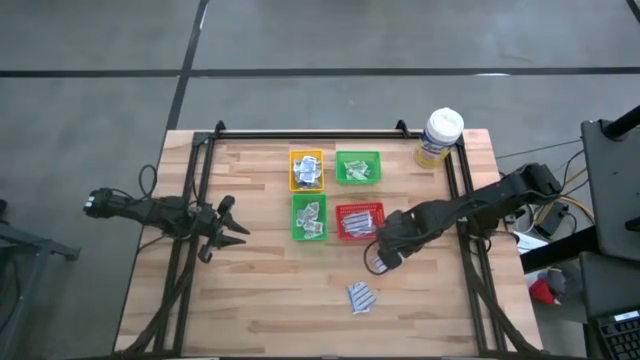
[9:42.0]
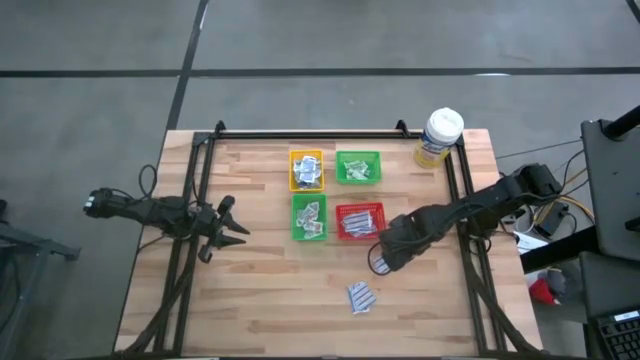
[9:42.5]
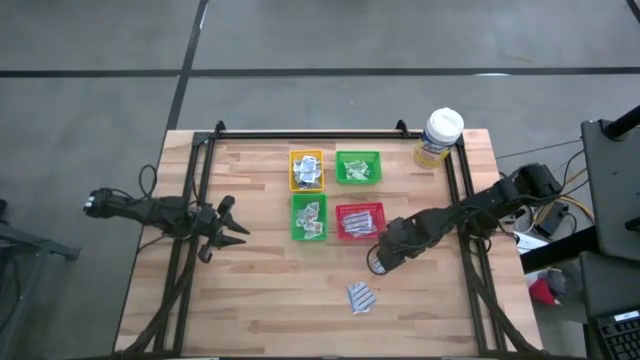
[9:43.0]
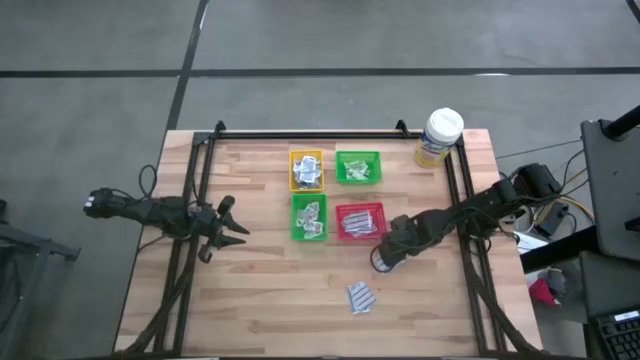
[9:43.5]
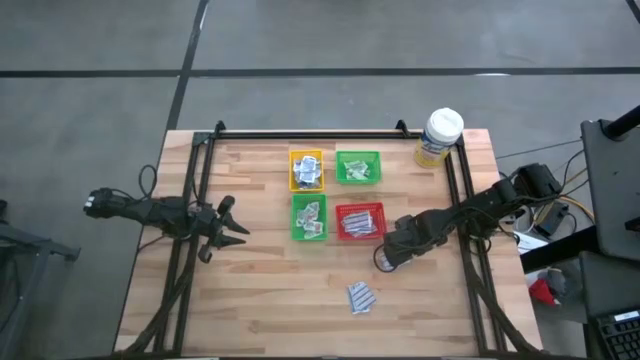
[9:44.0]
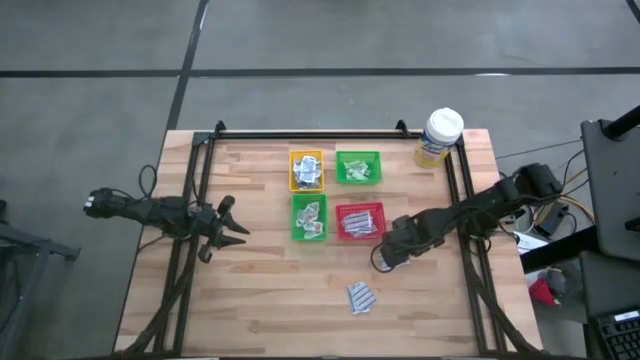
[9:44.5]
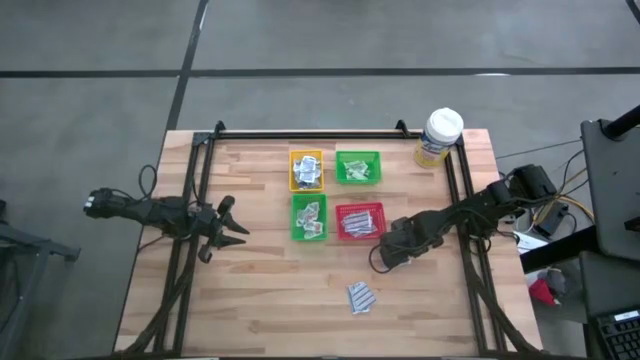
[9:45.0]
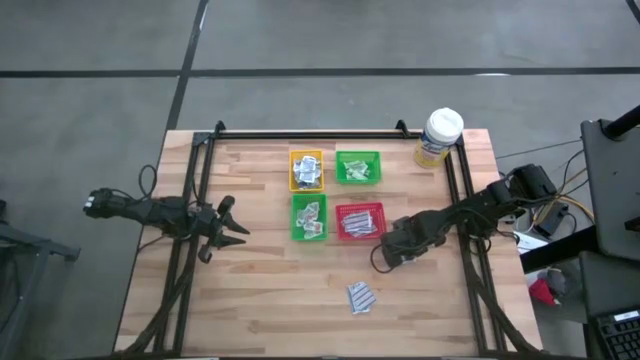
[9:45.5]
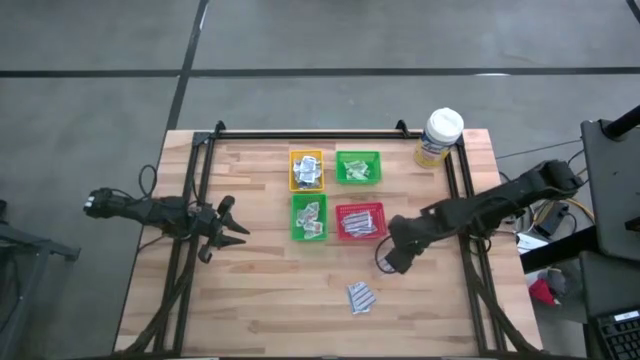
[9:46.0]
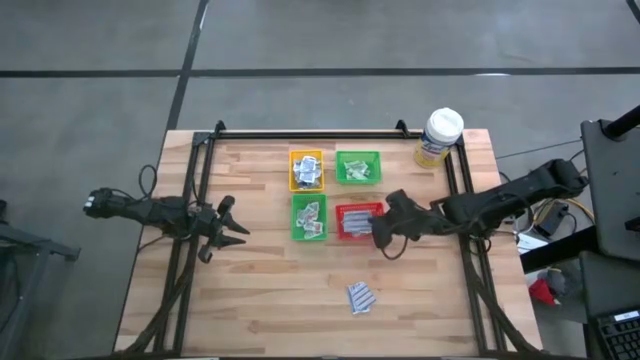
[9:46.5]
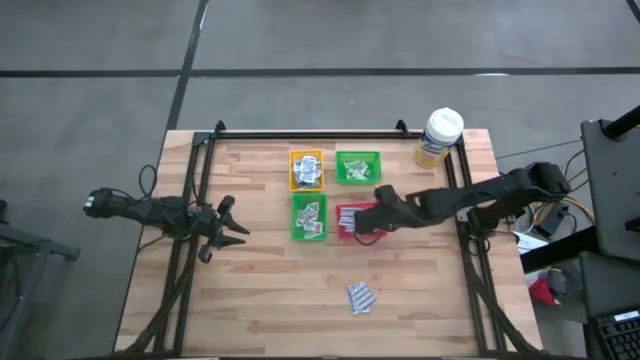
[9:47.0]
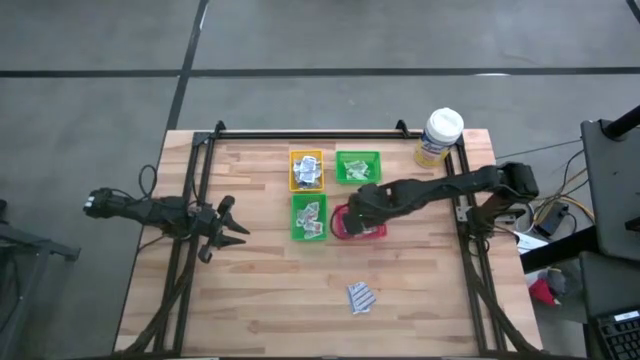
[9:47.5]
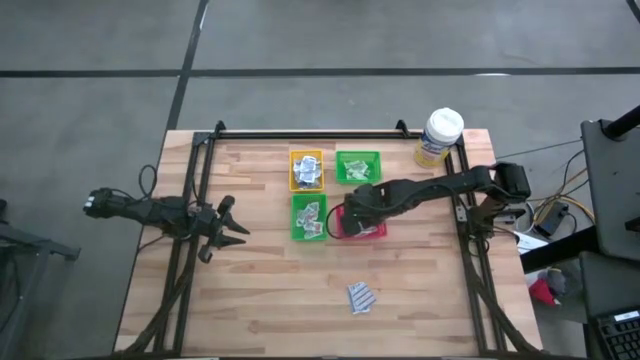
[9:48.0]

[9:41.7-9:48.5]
Task: Pick & Place First Aid Supplies
Put the blue bandage pack into the red bin

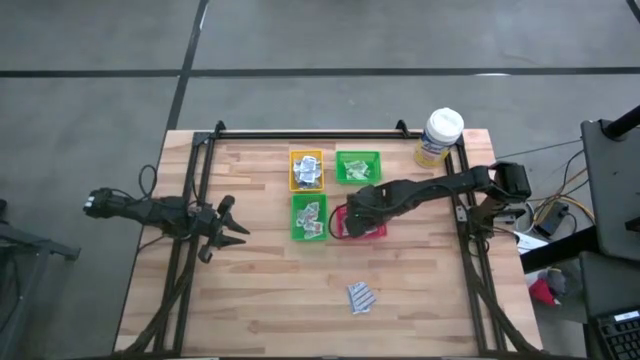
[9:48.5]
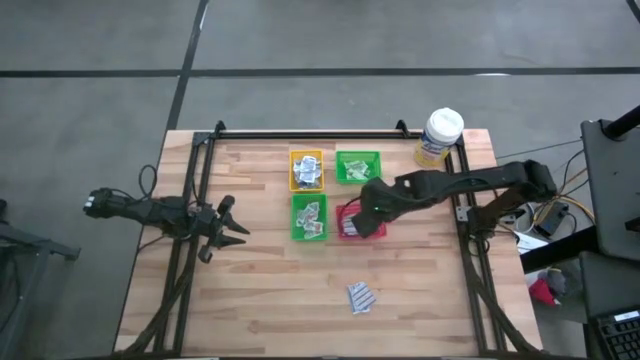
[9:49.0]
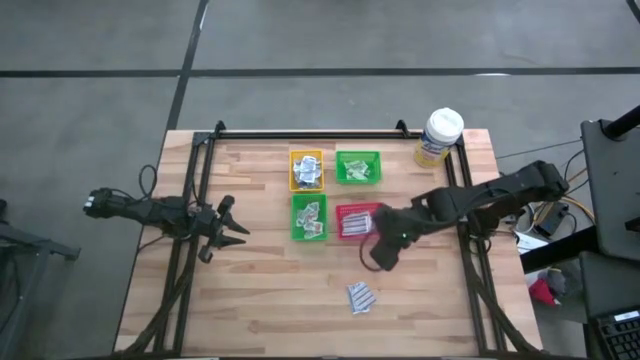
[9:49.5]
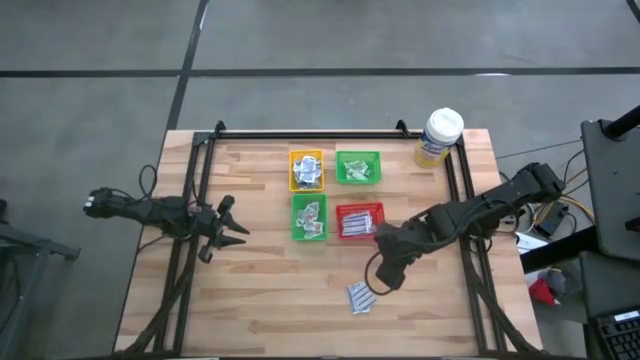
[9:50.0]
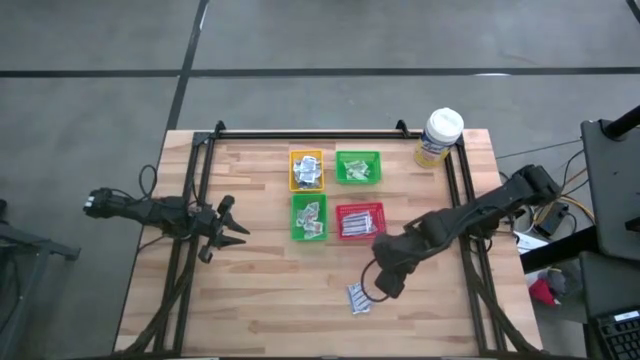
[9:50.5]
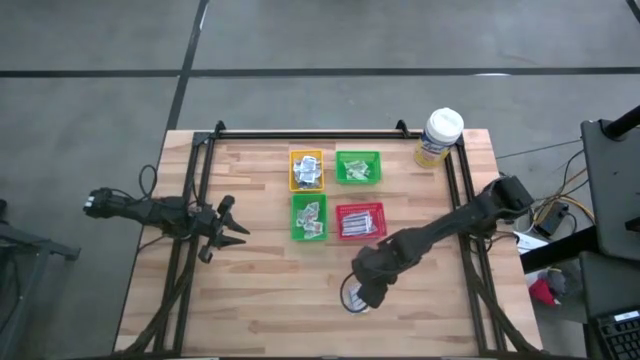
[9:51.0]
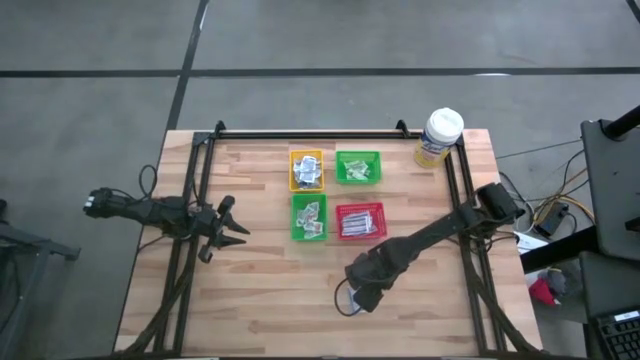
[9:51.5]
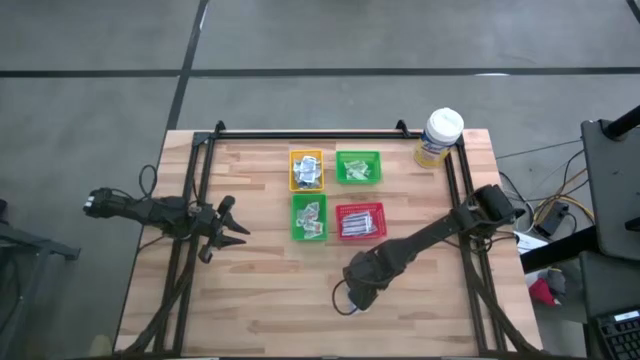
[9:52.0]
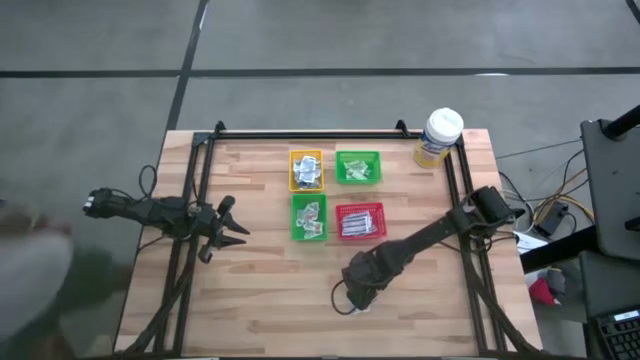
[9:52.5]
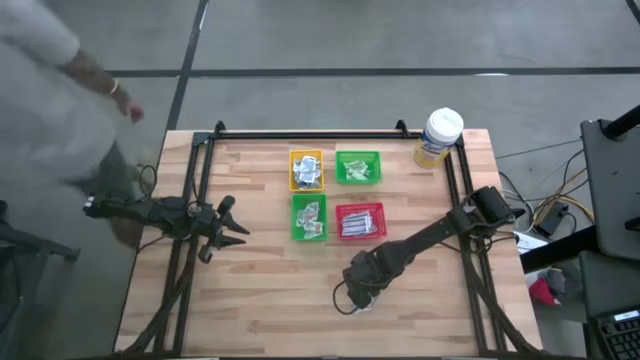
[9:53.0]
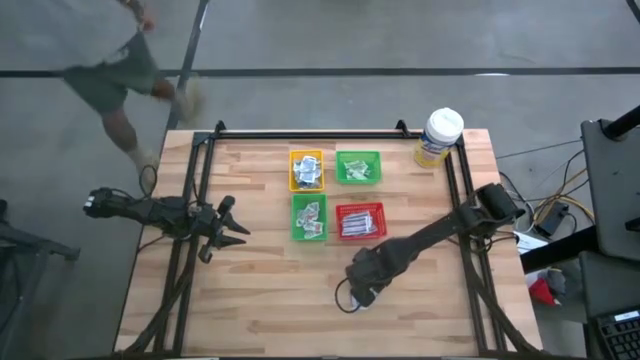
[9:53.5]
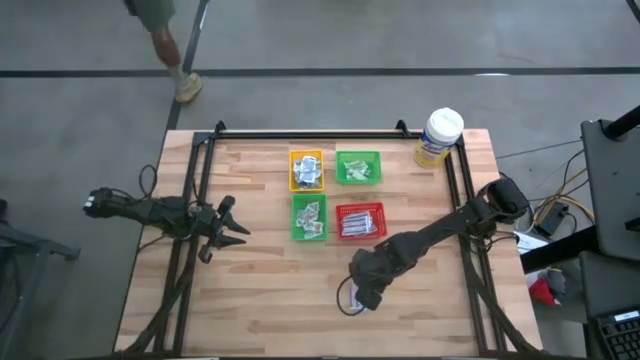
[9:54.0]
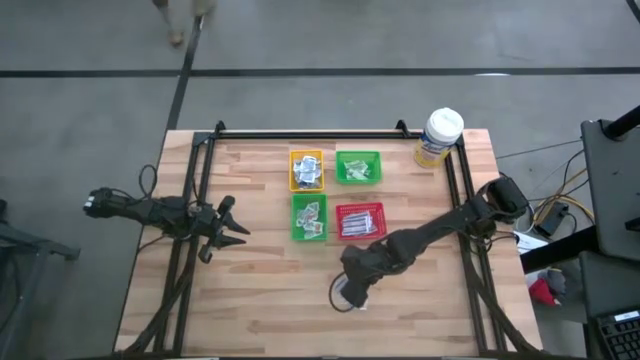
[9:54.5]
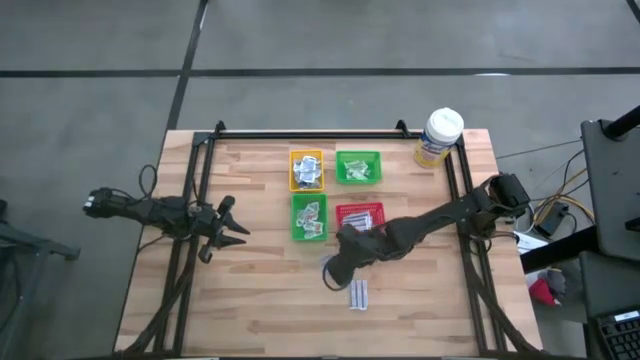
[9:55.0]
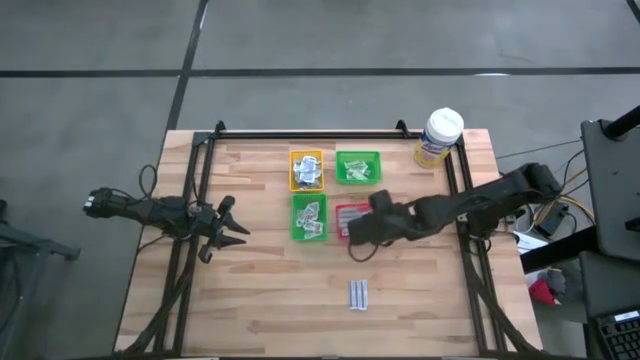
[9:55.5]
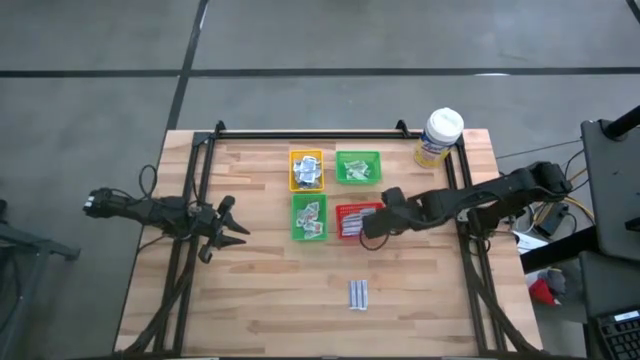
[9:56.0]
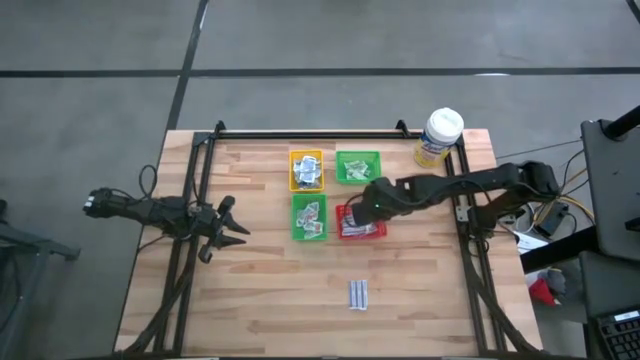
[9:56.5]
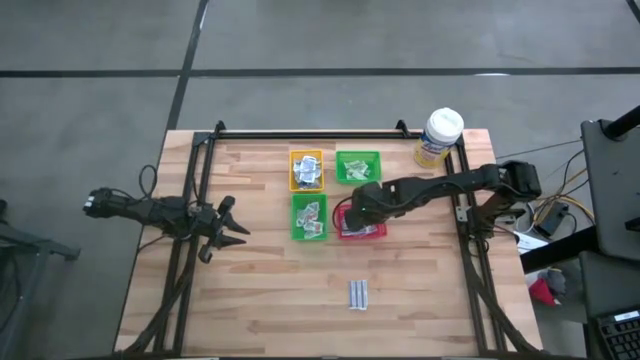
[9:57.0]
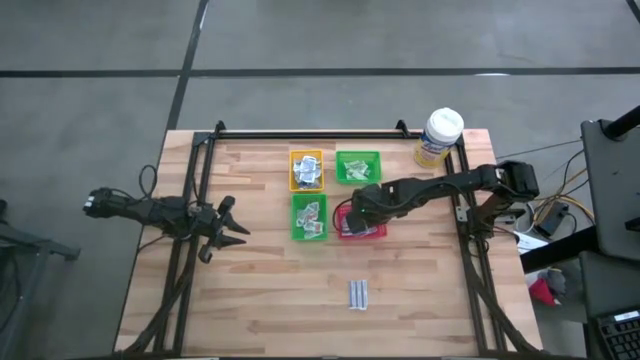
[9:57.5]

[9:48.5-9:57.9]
Put the blue bandage pack into the red bin

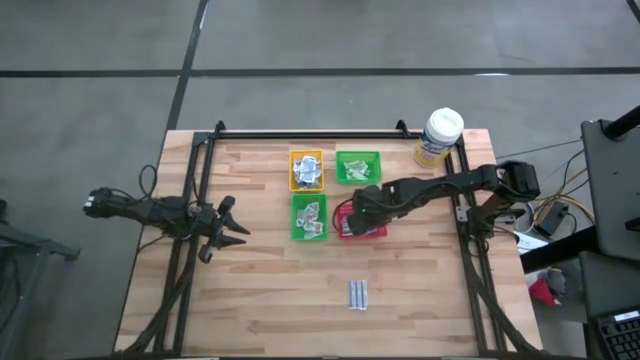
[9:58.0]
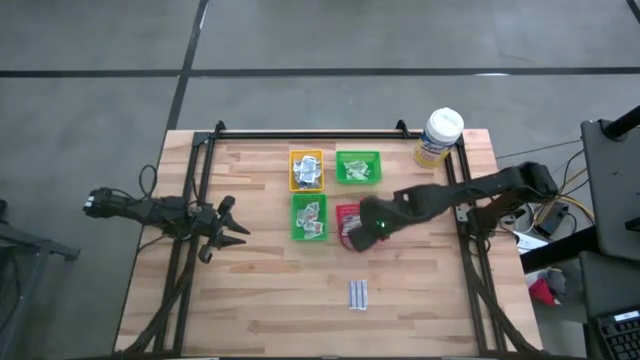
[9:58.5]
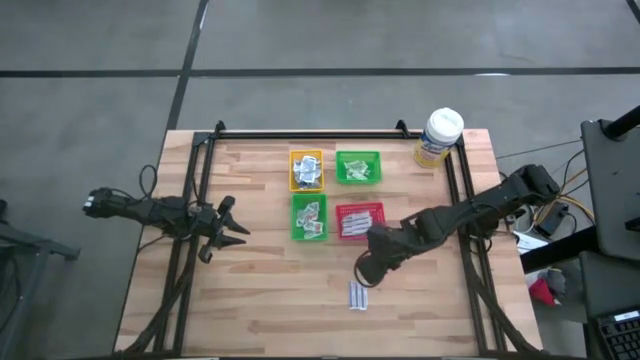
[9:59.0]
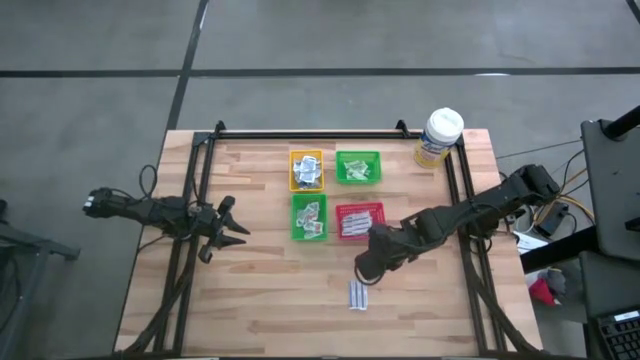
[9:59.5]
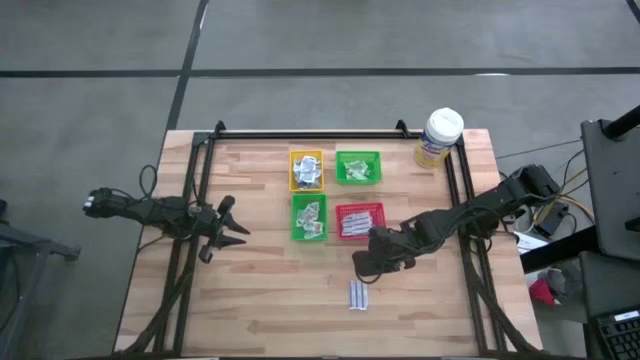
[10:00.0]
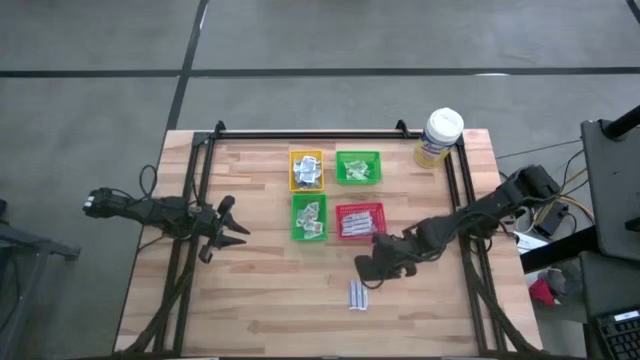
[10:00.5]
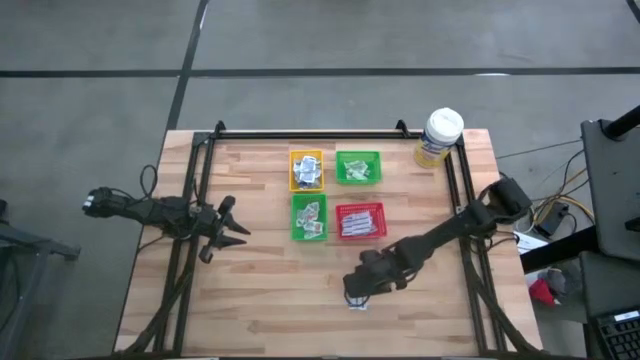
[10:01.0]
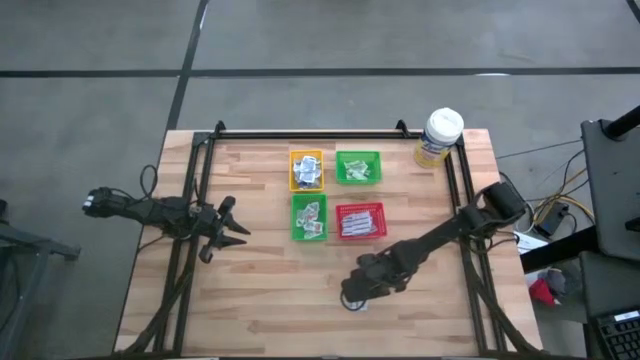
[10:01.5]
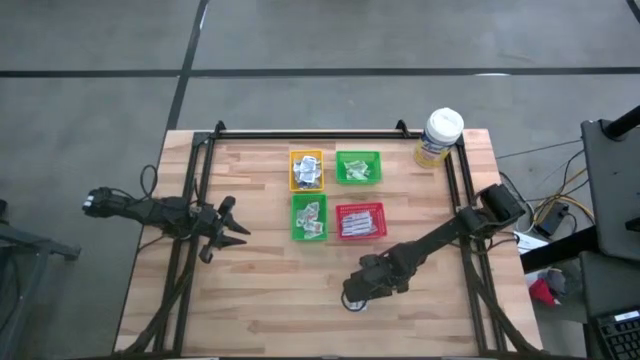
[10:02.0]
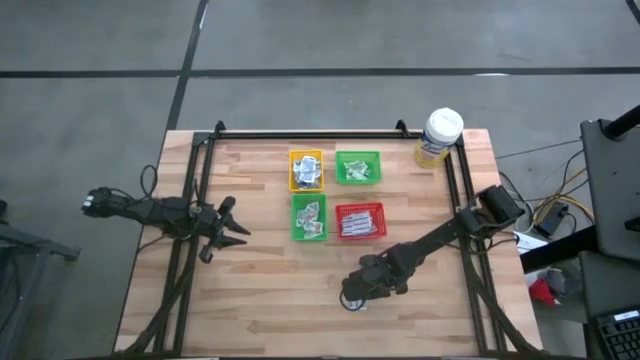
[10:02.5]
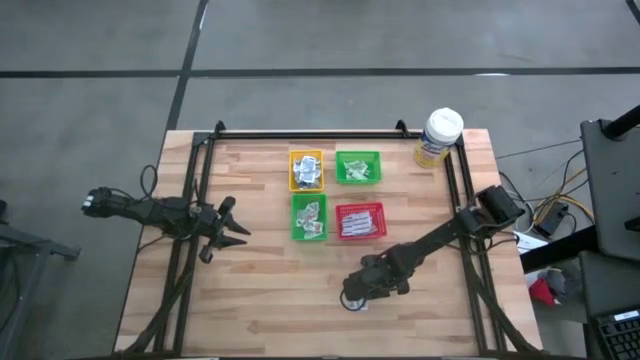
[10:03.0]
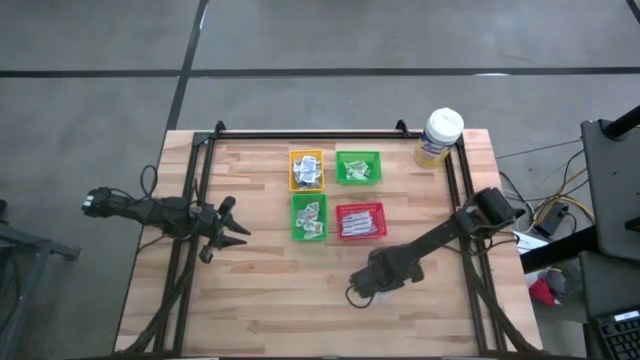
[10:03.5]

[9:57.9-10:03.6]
Put the blue bandage pack into the red bin
